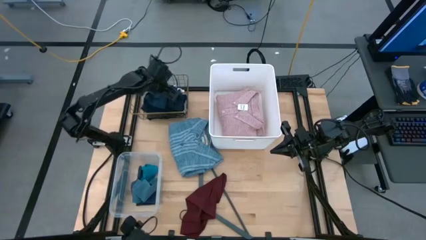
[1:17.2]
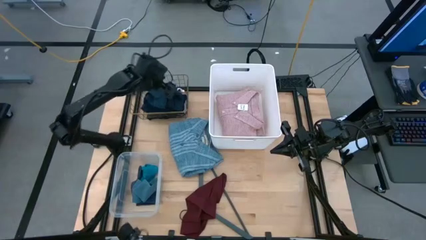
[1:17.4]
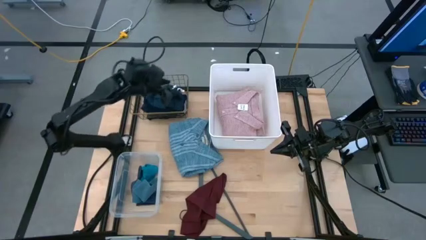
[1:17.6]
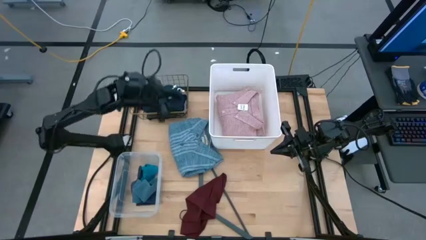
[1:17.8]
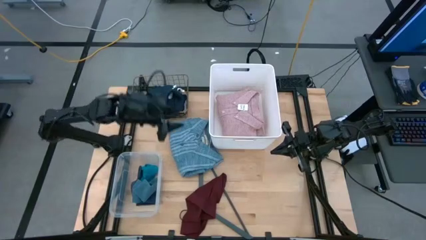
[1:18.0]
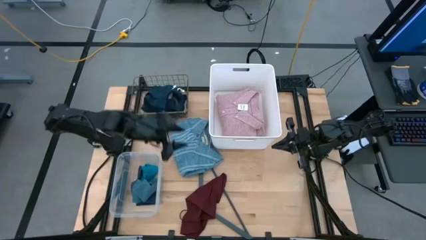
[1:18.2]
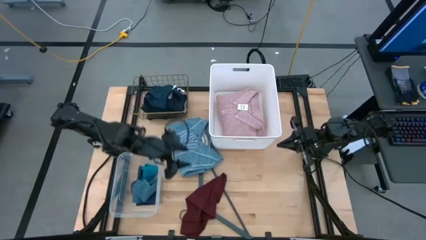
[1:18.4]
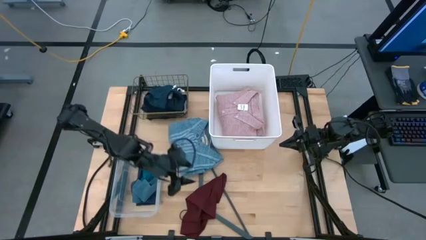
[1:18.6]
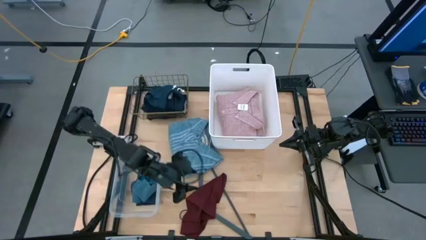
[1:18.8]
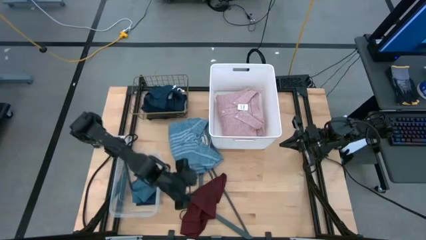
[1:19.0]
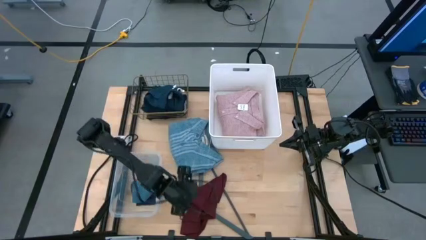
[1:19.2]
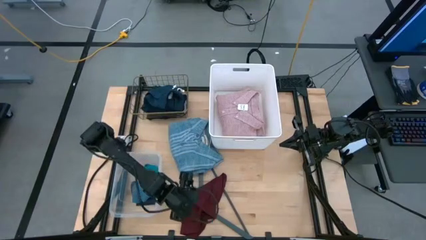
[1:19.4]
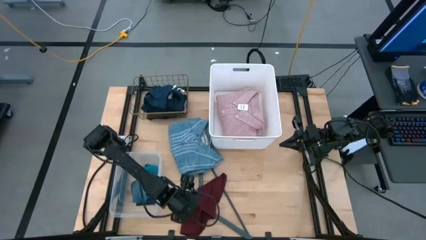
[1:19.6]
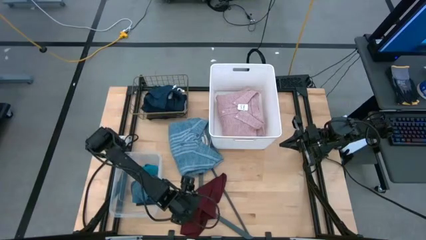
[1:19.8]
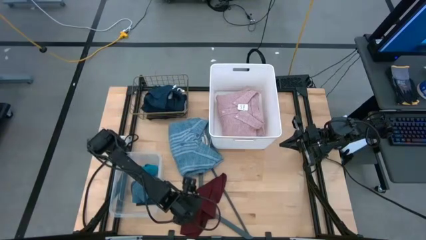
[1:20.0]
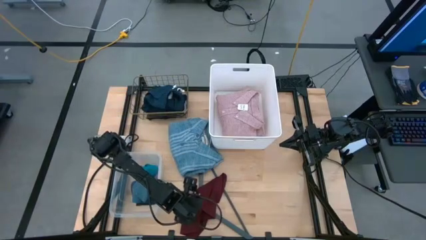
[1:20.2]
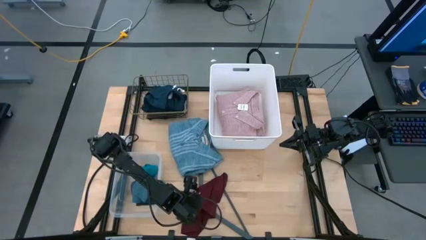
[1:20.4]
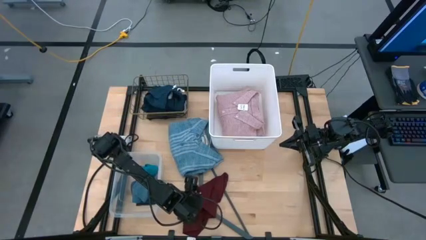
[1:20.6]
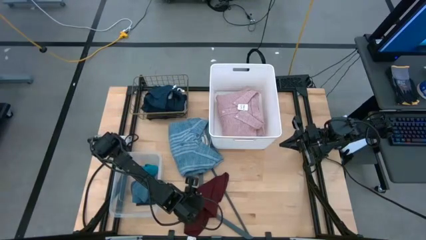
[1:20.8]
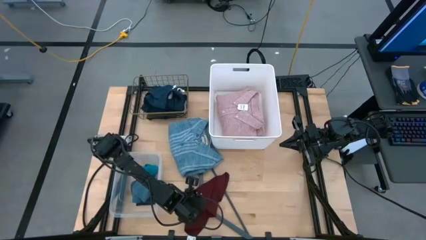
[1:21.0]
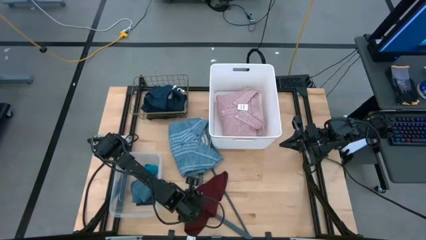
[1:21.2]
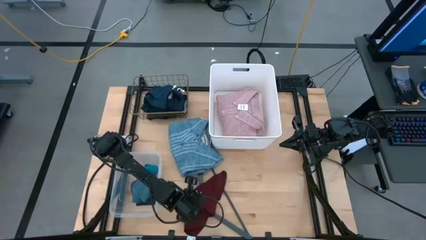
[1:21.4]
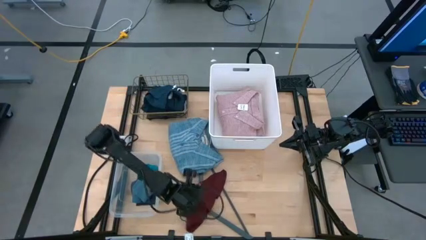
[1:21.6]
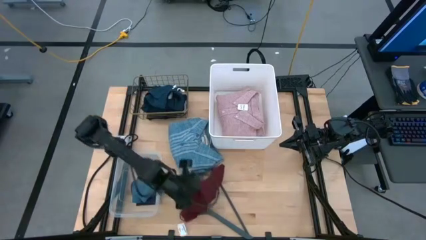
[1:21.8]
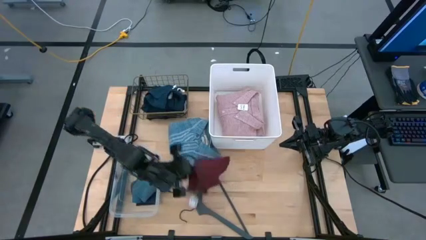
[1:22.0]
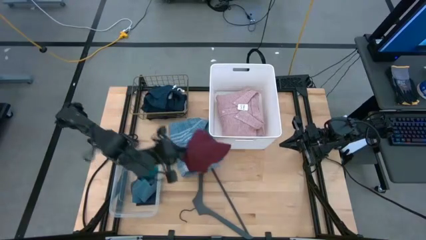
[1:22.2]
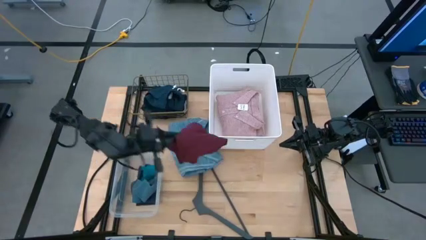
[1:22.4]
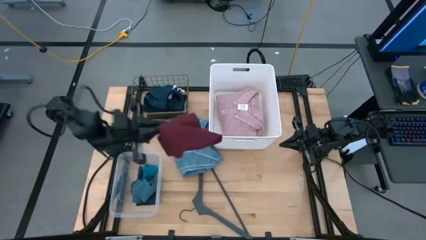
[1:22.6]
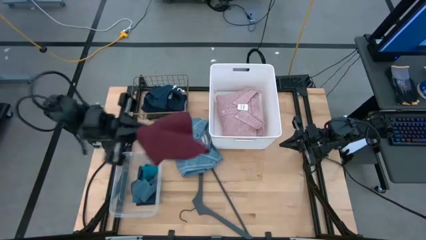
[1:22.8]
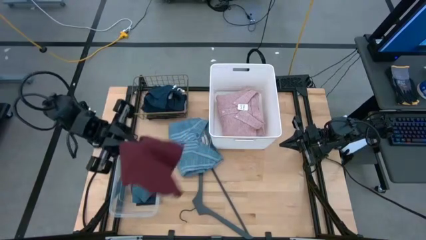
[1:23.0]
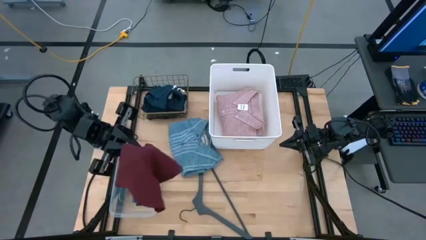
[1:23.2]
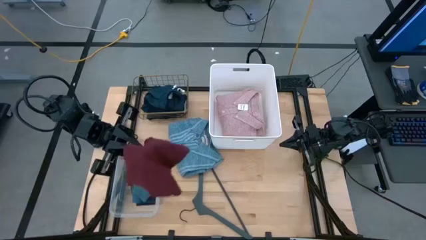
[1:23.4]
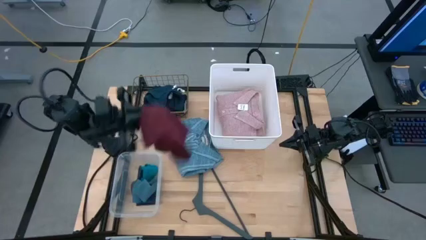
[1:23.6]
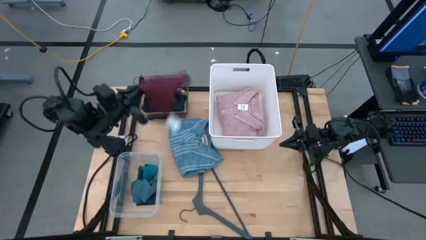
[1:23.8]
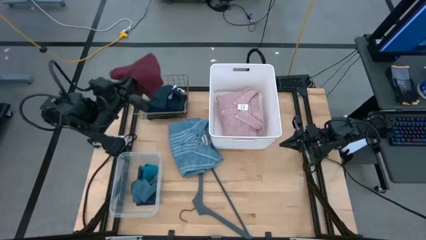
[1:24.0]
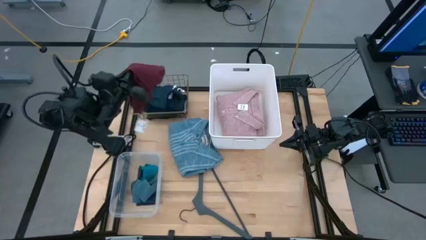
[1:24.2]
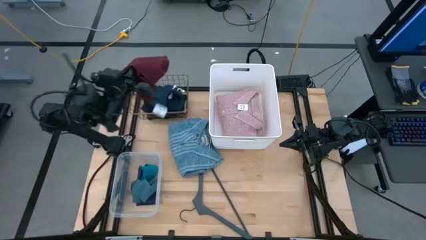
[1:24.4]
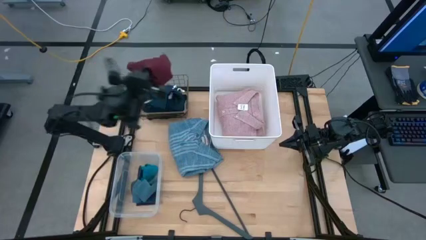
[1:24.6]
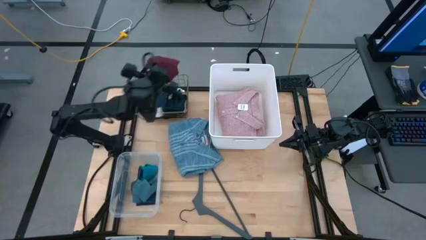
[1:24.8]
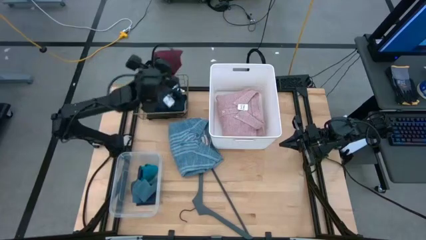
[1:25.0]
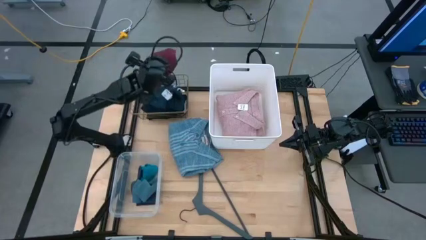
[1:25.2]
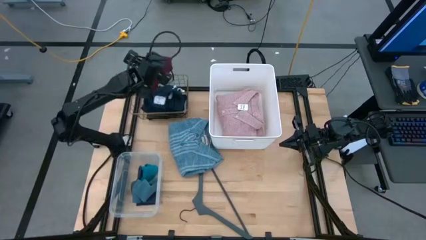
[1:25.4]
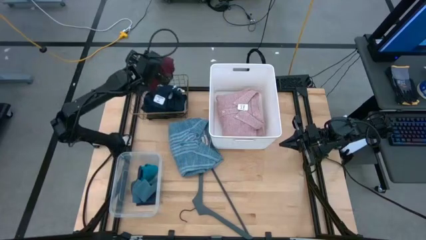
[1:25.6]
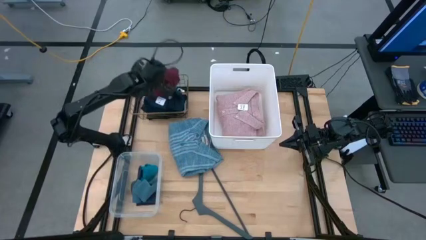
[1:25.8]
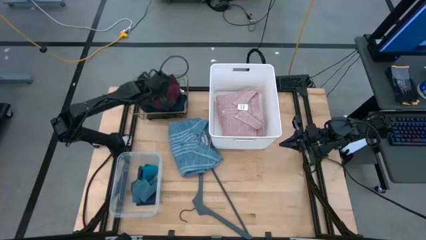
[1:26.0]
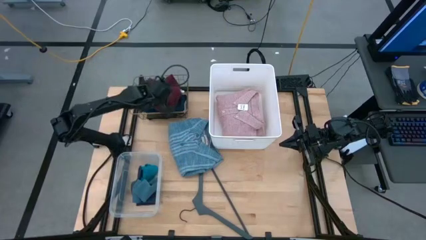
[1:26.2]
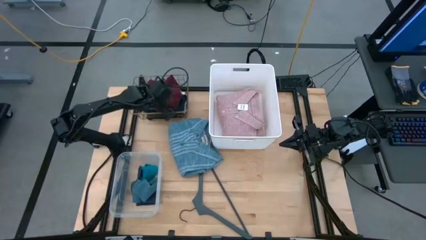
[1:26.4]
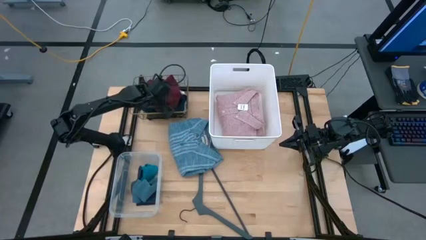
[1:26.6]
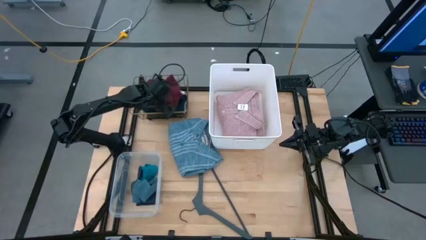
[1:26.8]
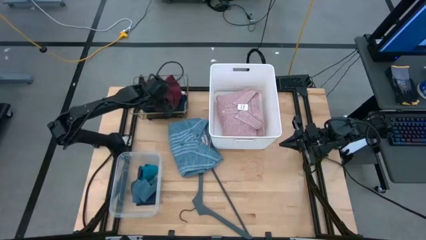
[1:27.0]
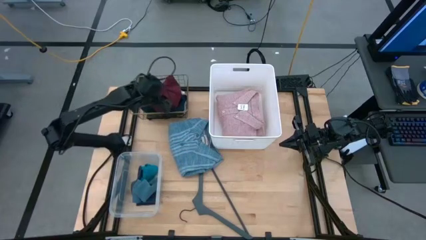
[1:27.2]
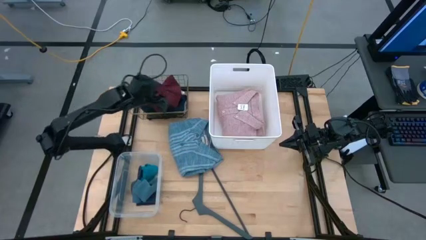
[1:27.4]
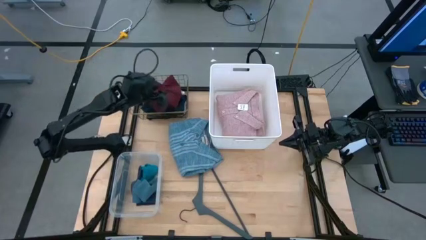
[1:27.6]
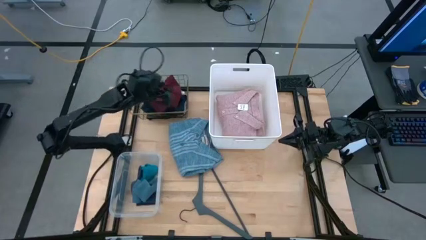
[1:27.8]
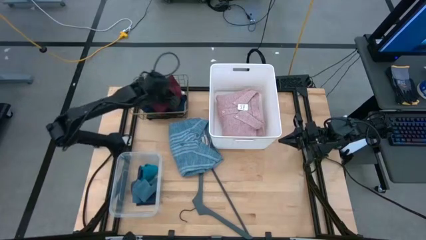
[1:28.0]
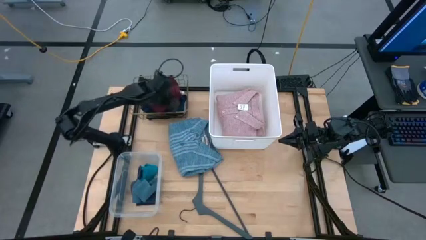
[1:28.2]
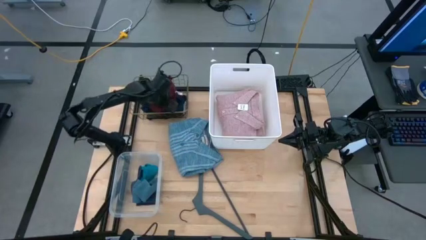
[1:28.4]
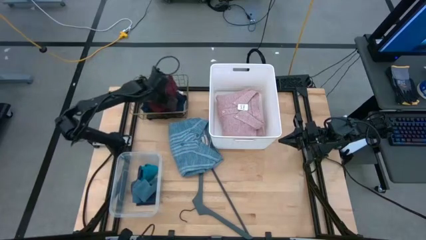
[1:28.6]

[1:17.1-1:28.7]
Task: Pick & Place Cloths
Put the red underwear into the brown basket

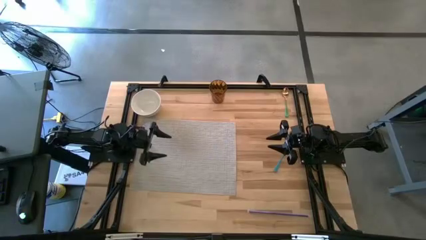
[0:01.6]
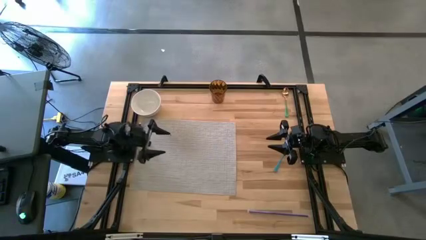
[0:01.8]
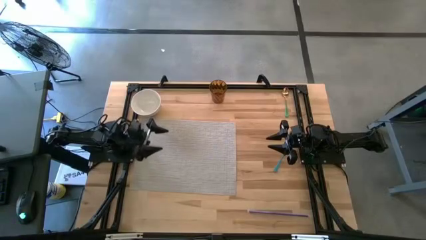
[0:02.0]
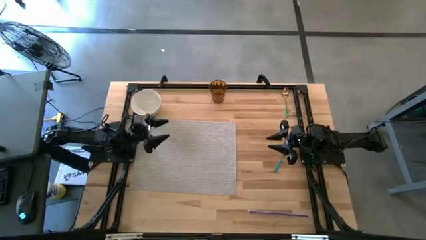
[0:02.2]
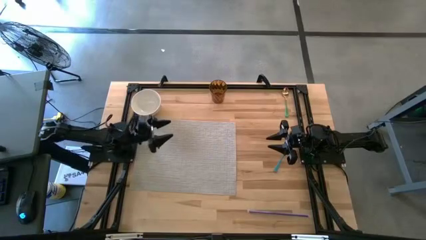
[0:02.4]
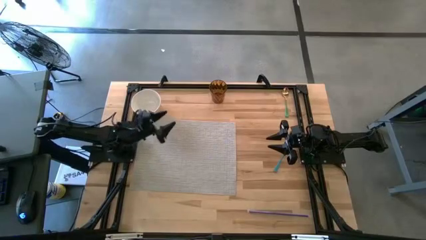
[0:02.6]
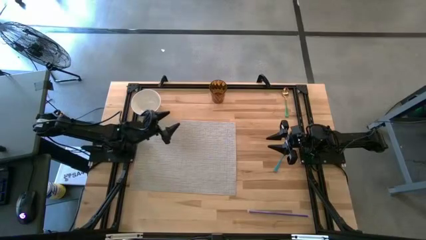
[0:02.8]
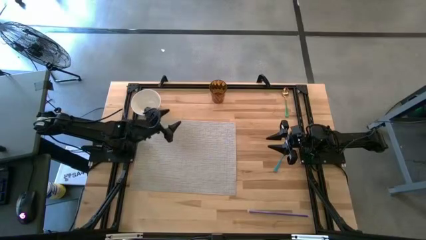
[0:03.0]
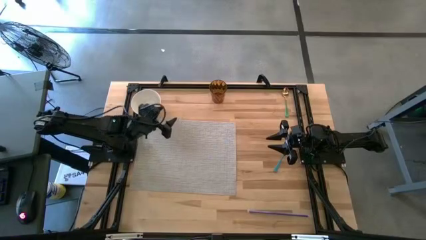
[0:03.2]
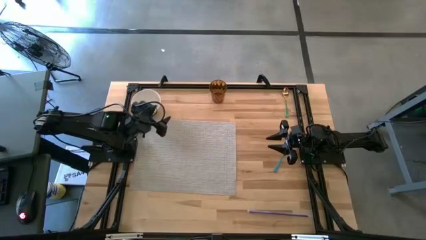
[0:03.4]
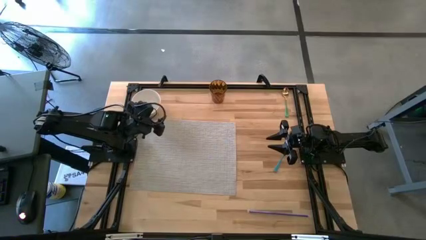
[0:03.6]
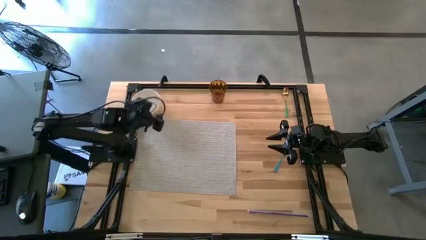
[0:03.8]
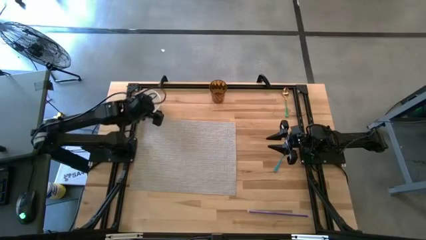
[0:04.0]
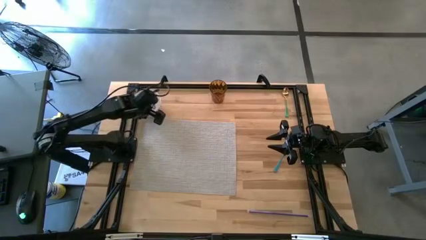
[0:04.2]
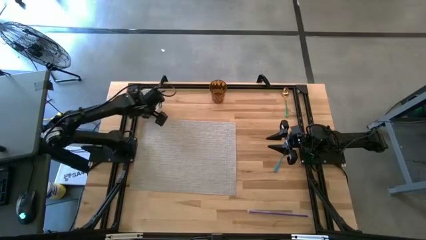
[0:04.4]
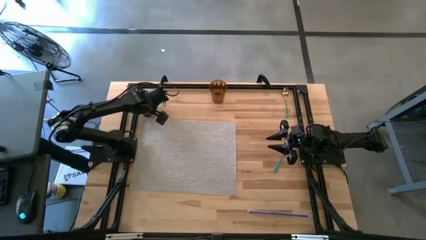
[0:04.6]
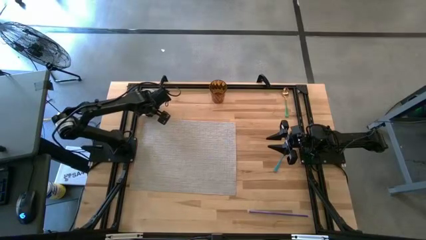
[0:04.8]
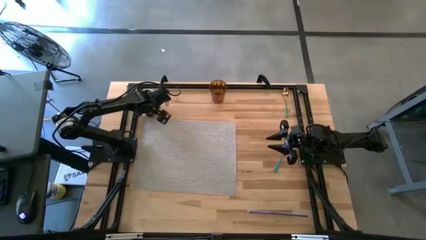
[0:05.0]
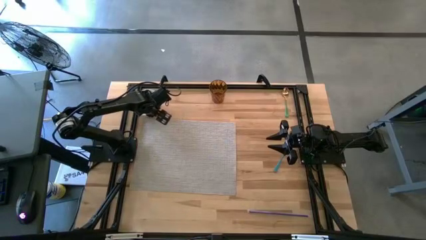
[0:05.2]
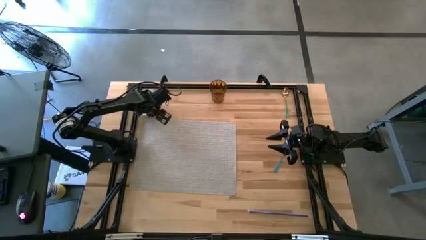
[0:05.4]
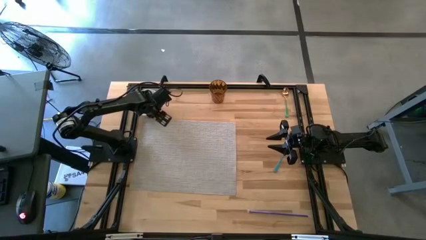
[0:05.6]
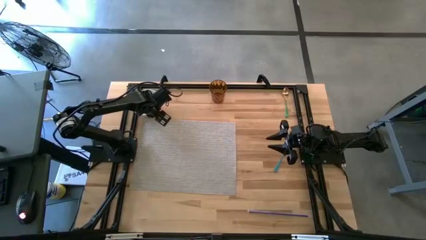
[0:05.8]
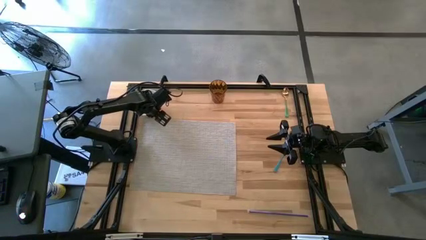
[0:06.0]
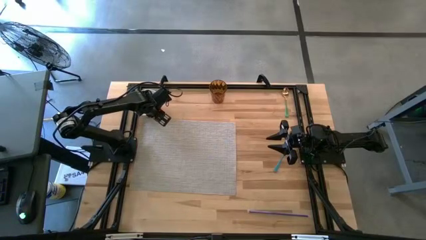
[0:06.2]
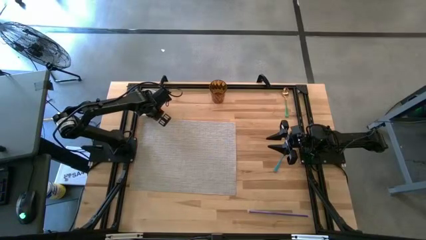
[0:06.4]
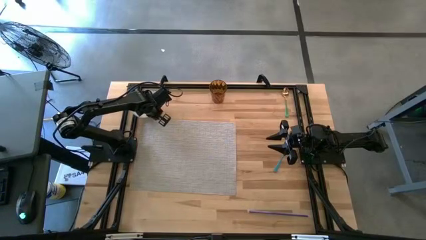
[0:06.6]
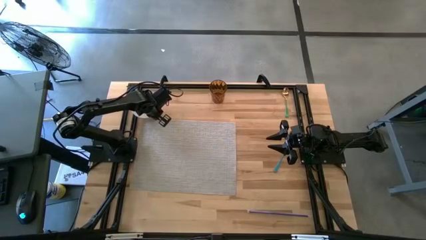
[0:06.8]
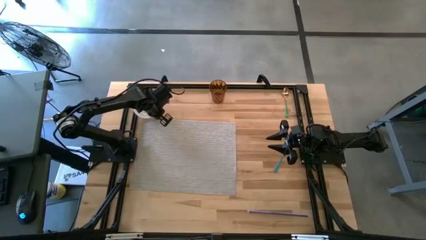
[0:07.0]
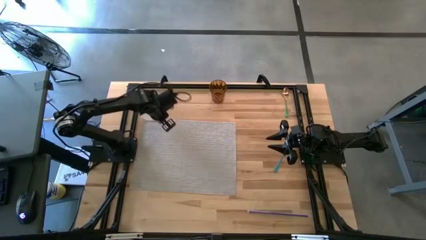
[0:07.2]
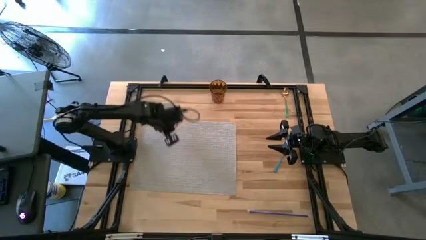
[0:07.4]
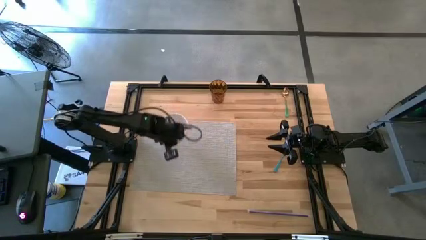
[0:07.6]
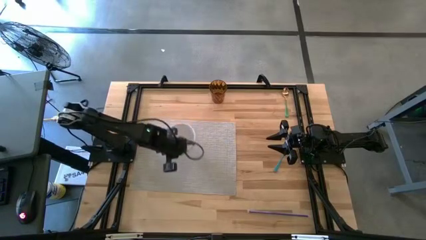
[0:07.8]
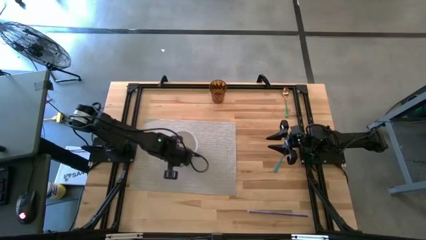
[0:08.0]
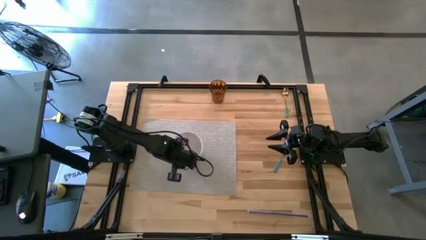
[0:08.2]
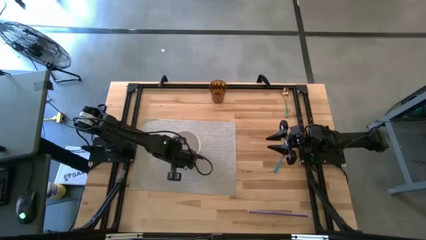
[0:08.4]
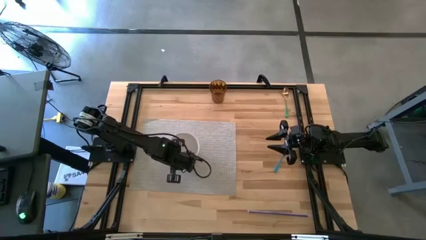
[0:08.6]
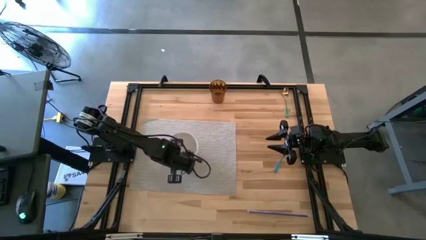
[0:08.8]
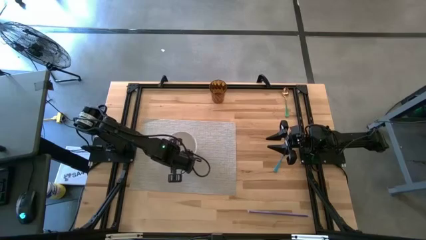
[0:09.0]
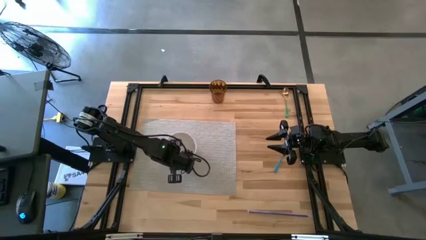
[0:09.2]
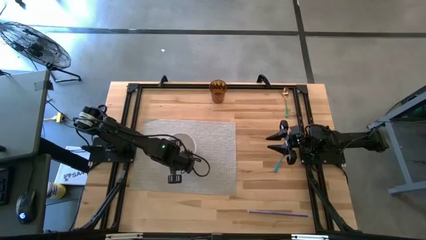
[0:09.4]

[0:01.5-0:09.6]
Task: Pick & Place Utensil
Put the white bowl on the gray mat
